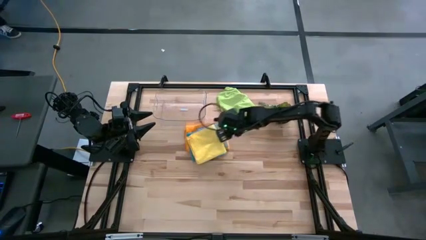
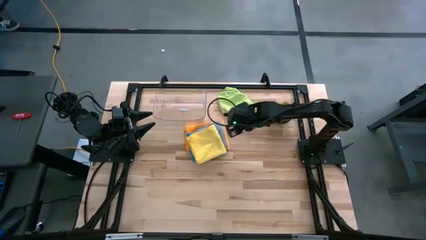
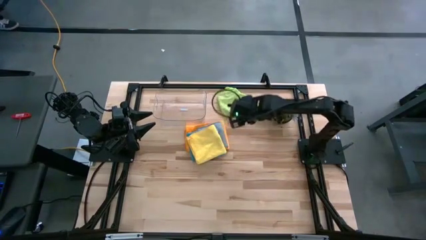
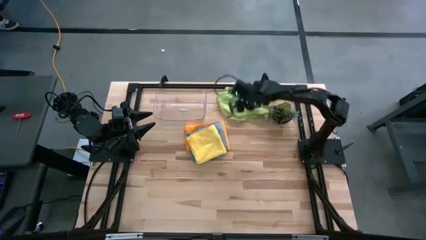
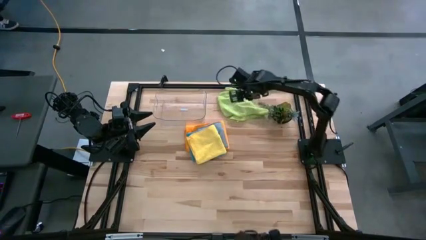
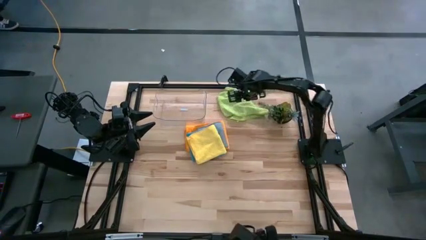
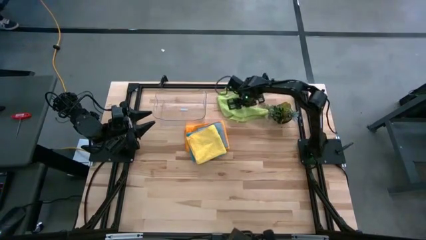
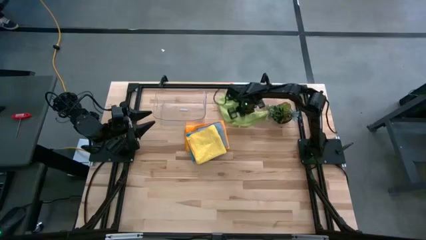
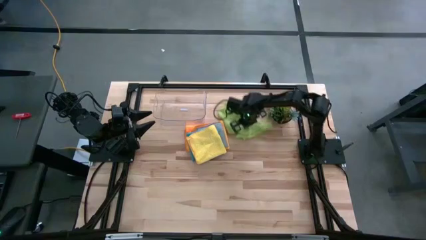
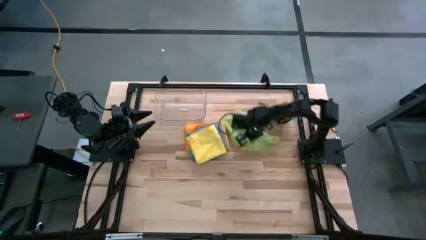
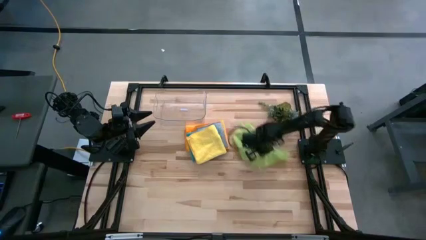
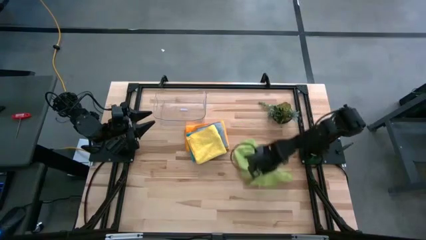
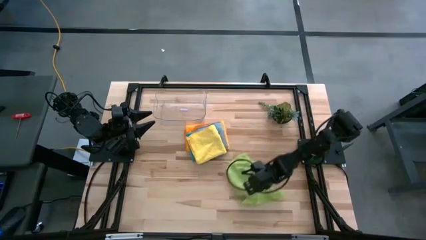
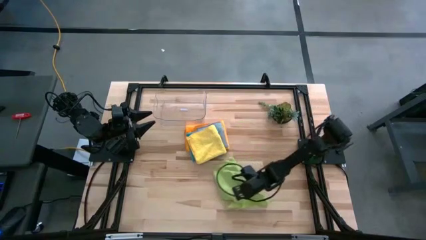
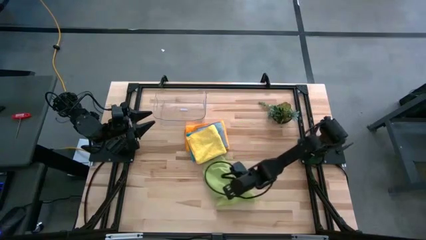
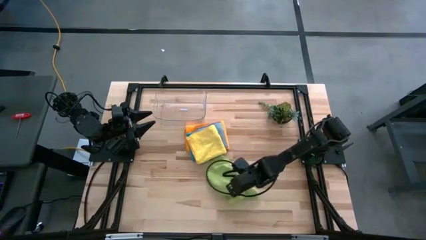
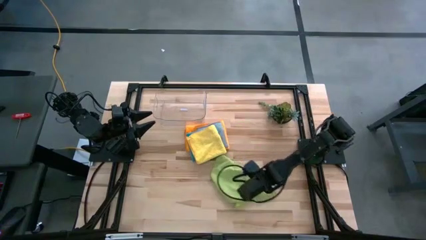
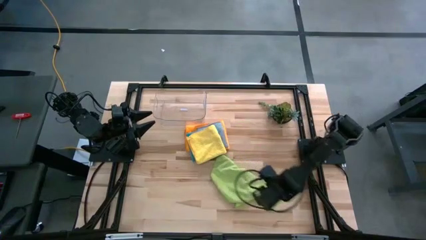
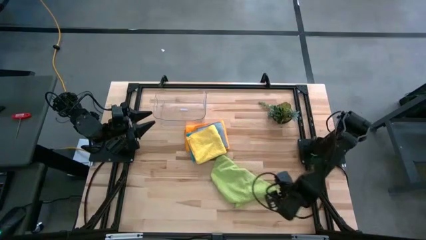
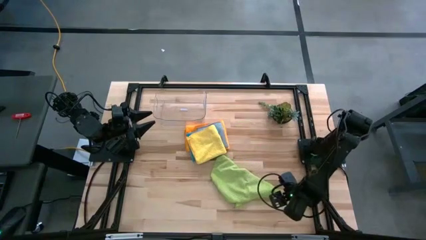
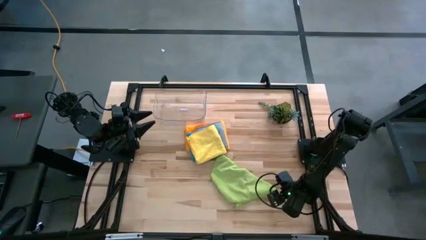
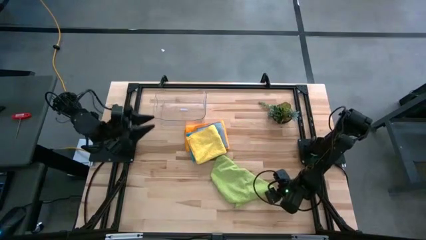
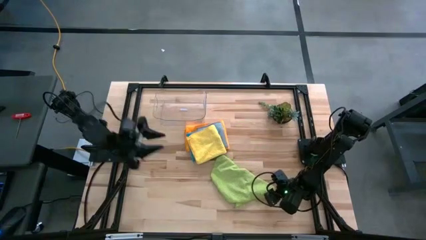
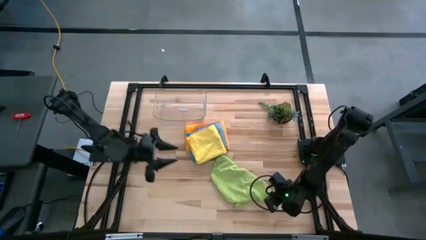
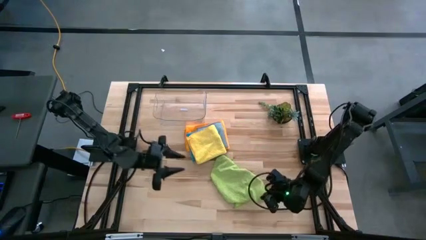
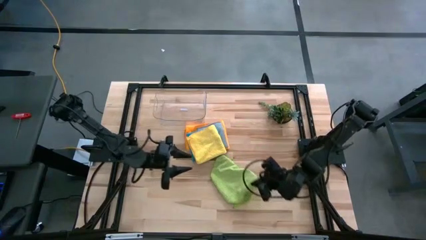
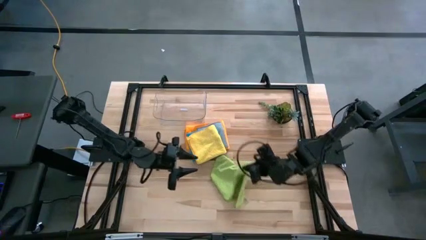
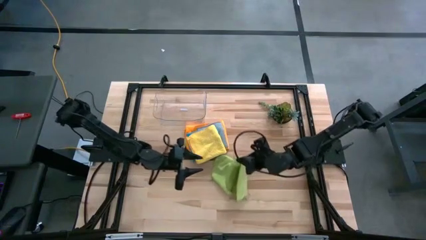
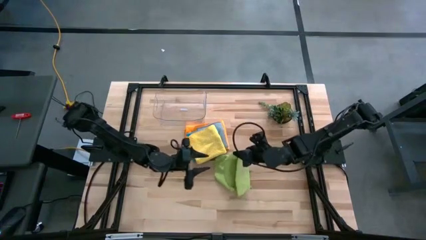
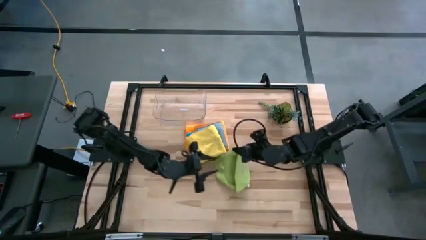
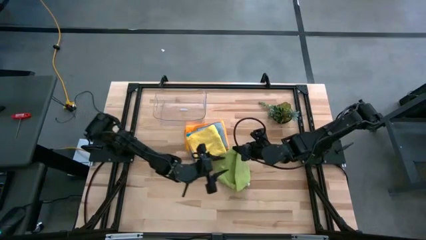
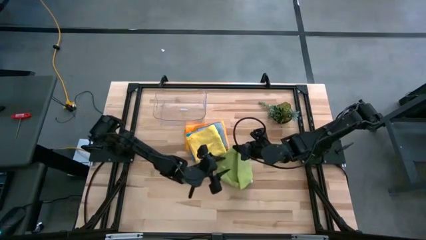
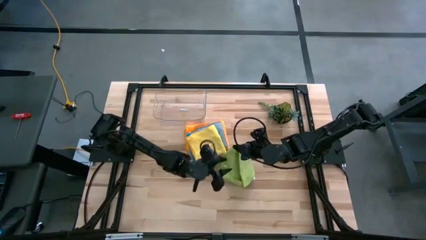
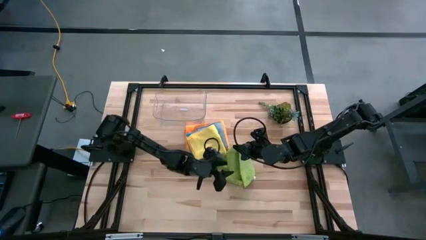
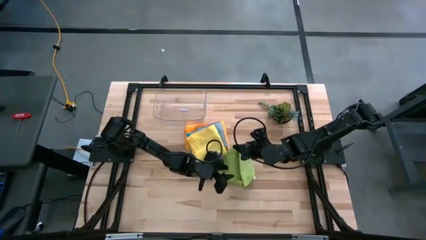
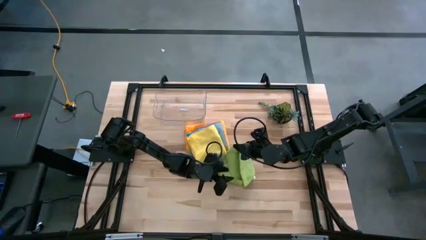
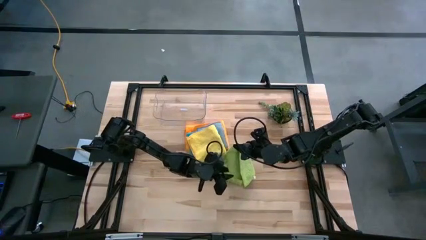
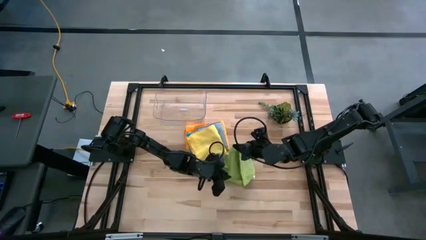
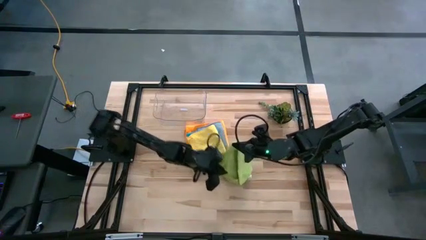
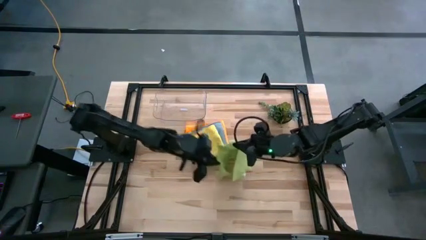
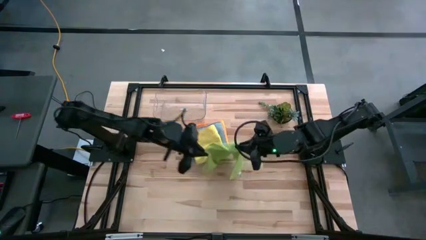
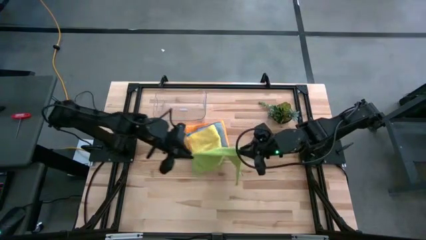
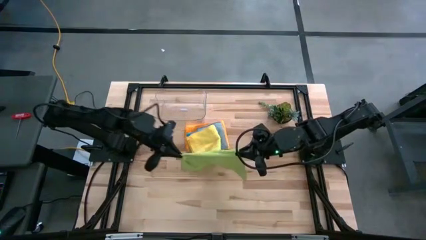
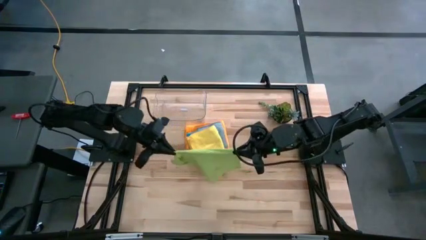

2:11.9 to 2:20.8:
Task: Fold microfiber towels
Fold the green towel

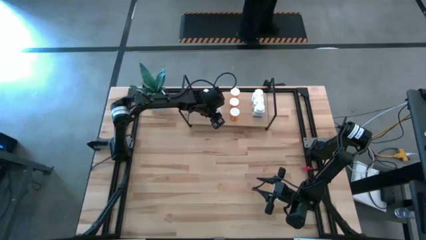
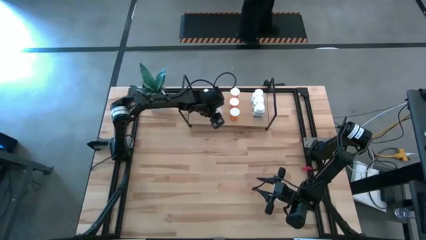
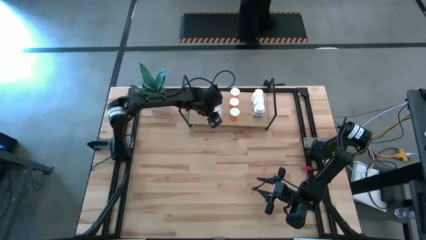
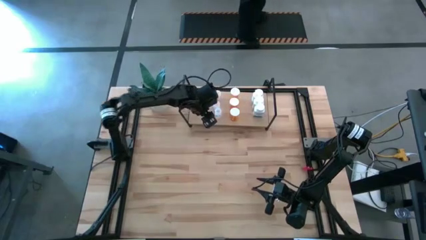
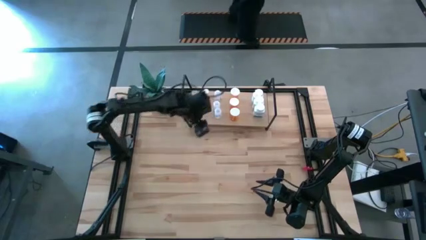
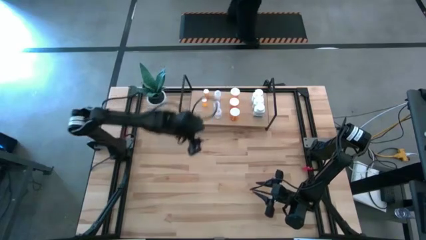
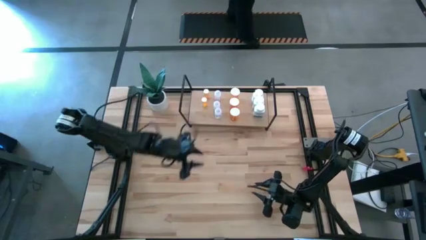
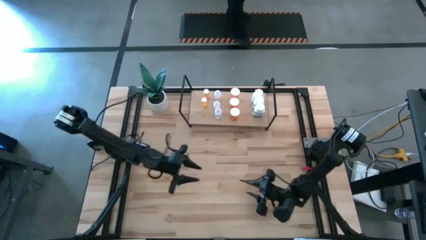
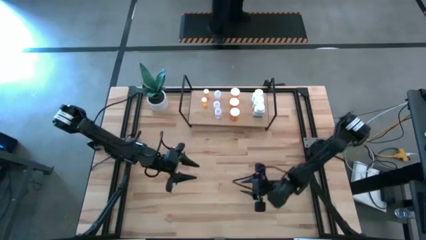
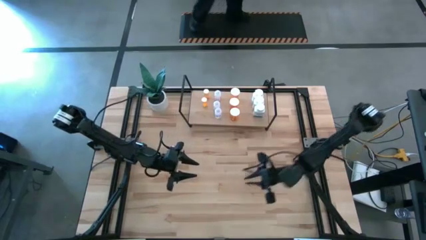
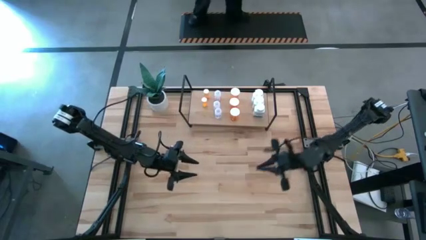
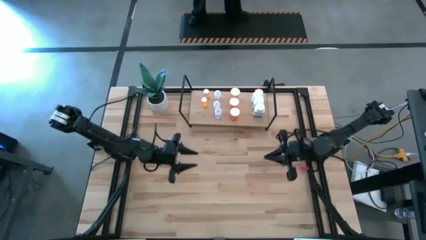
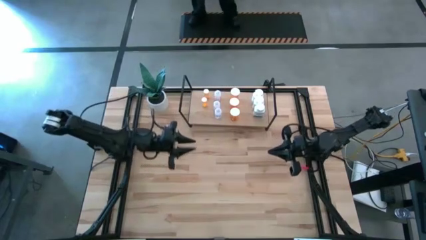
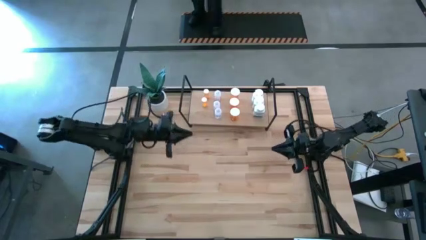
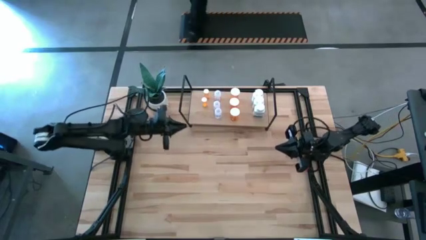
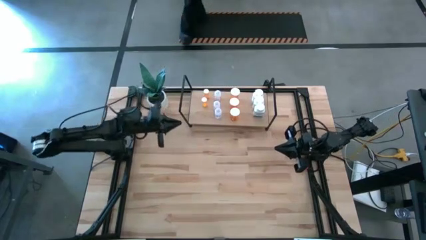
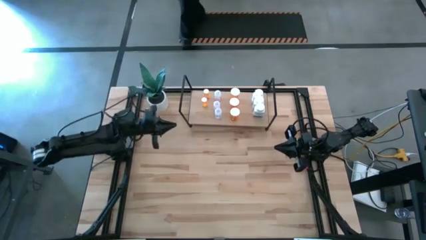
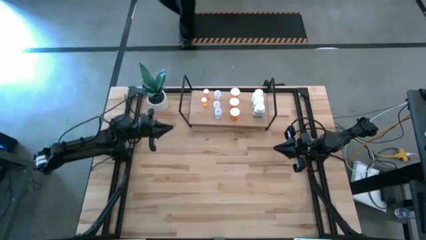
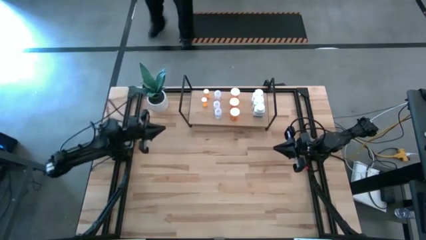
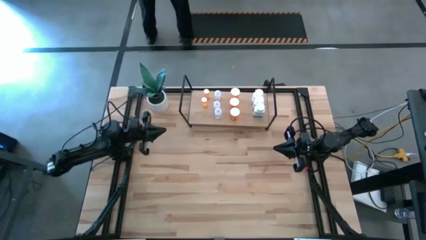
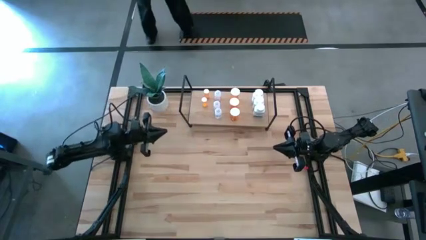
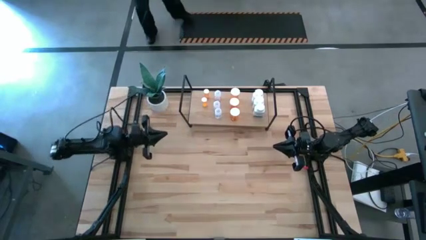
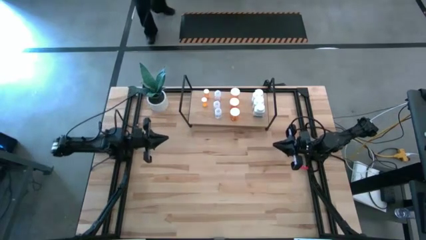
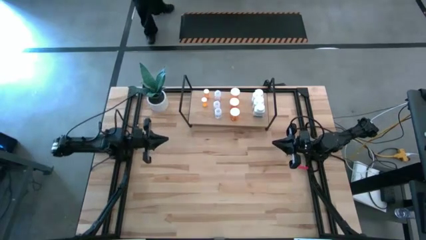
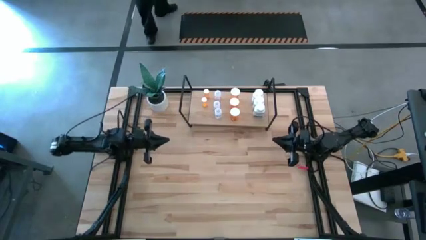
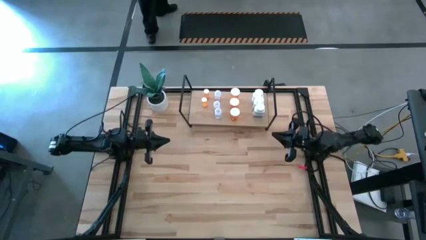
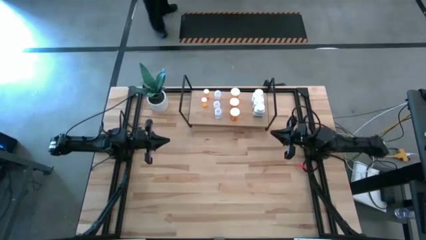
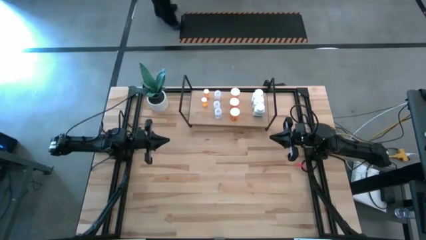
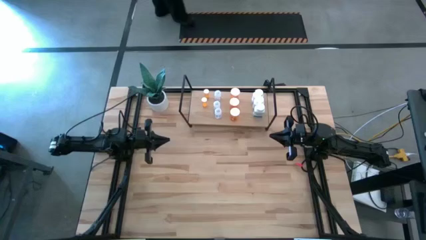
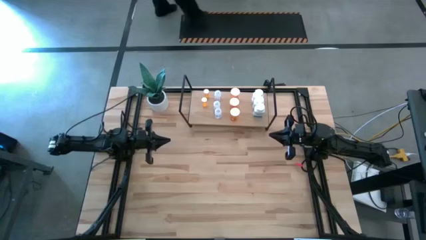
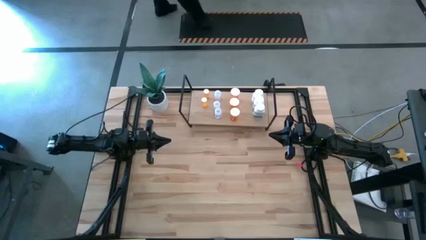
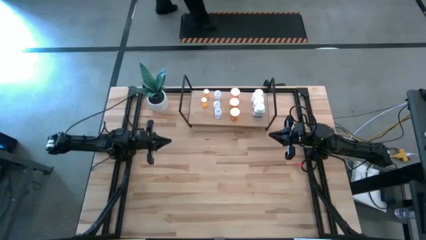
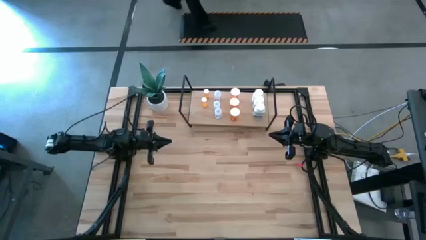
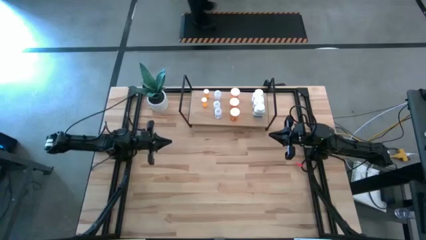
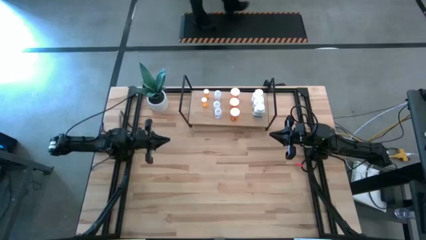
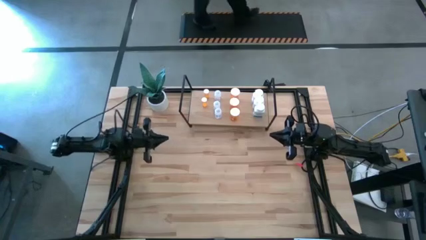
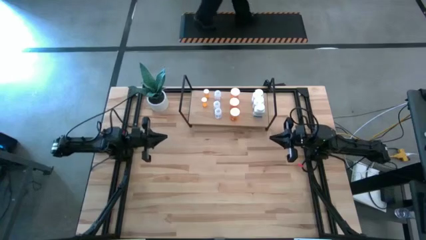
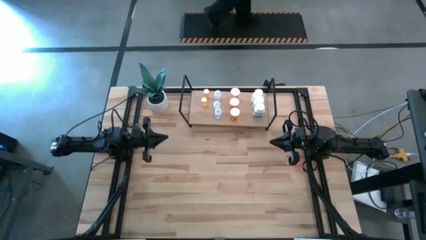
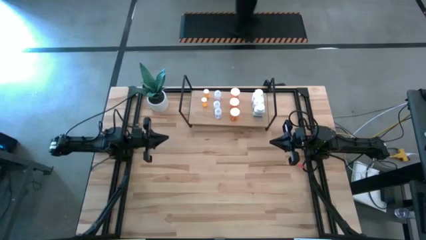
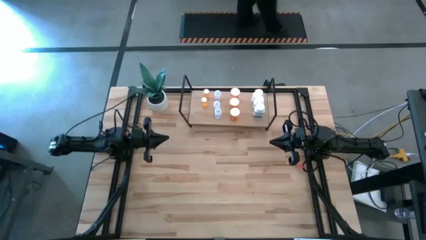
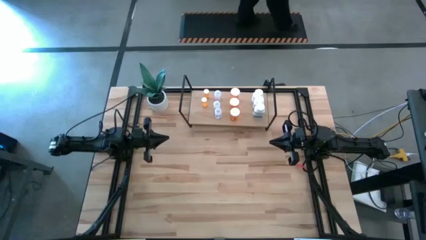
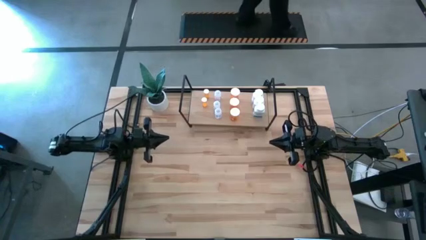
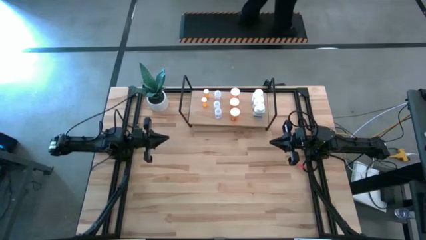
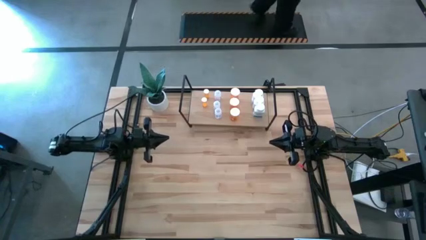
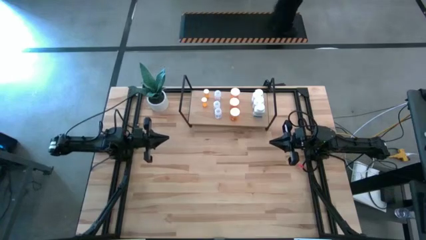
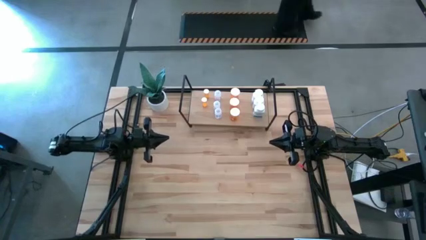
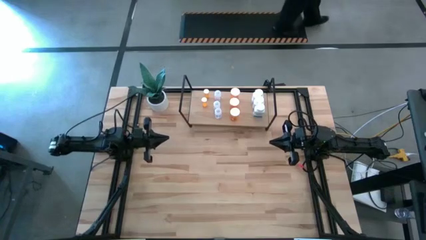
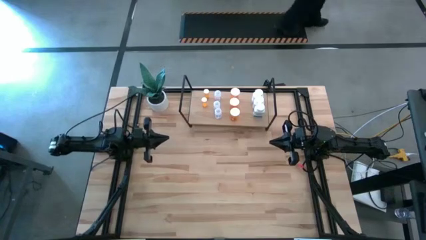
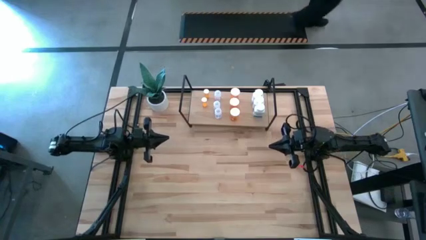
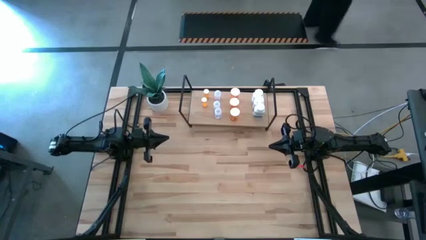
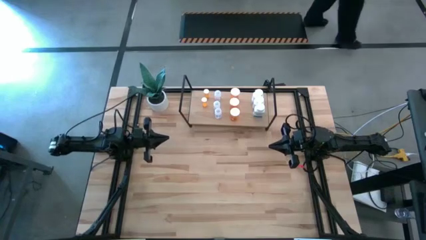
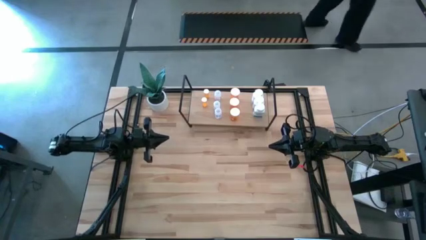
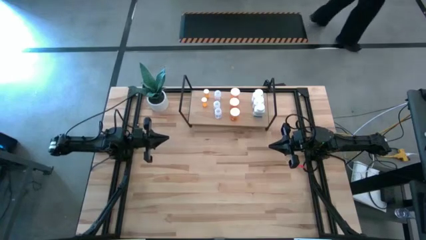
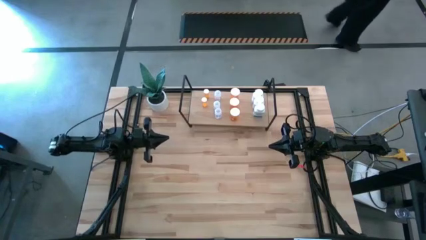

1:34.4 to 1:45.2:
Task: Pick and place medicine bottles onto shelf by color
Return to Home Position
